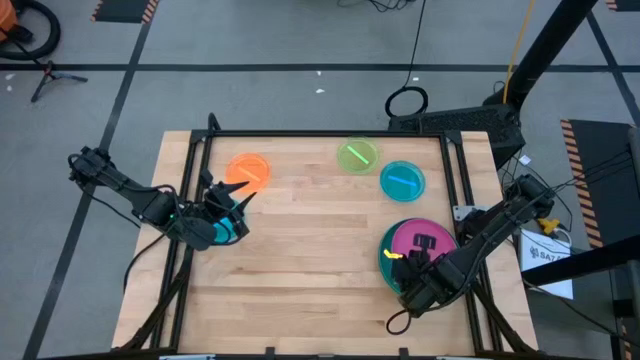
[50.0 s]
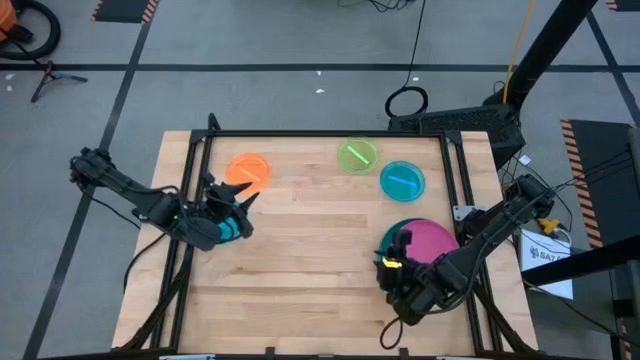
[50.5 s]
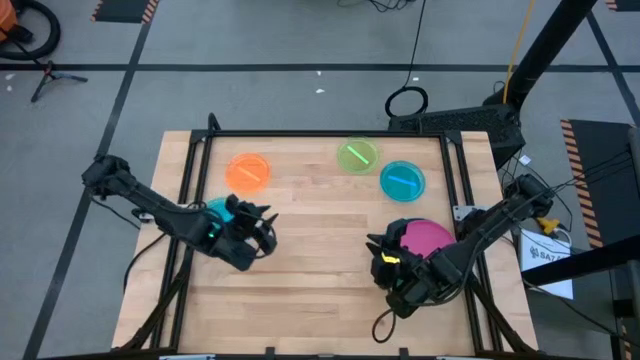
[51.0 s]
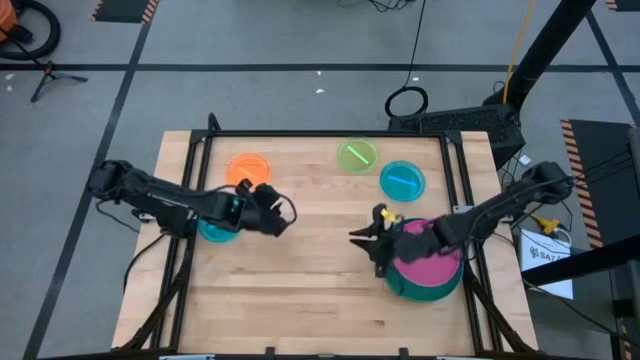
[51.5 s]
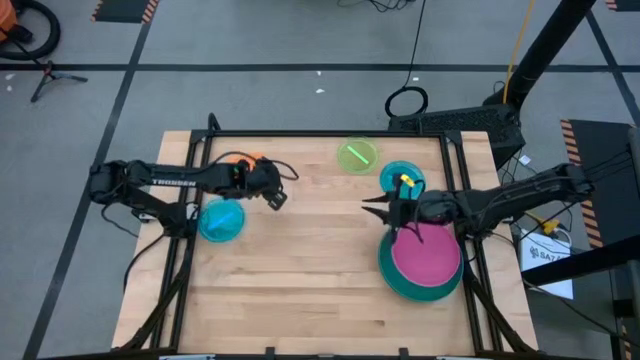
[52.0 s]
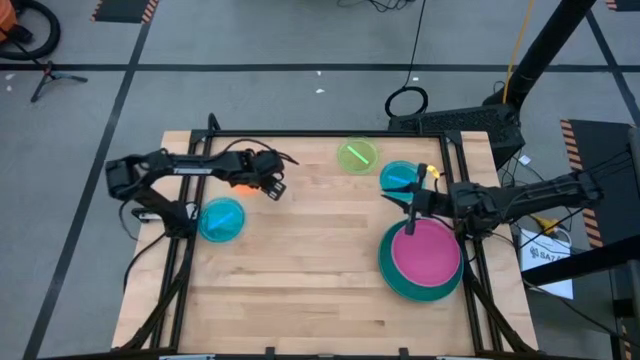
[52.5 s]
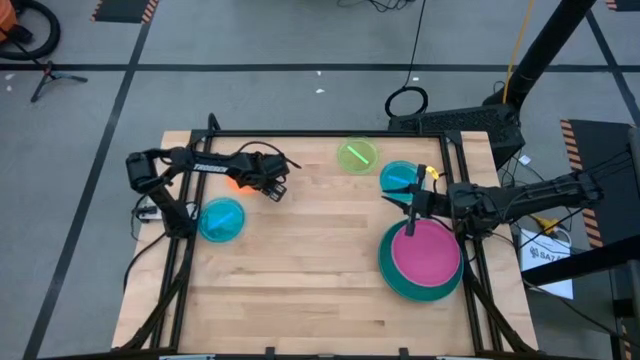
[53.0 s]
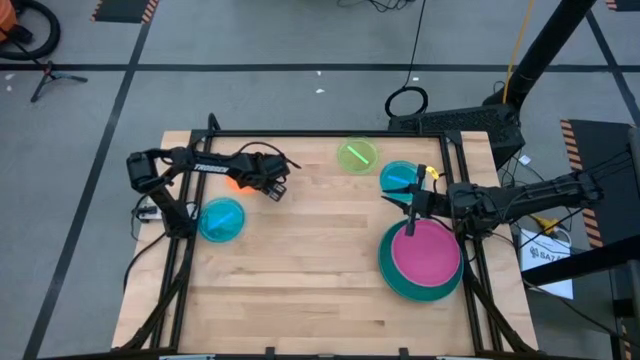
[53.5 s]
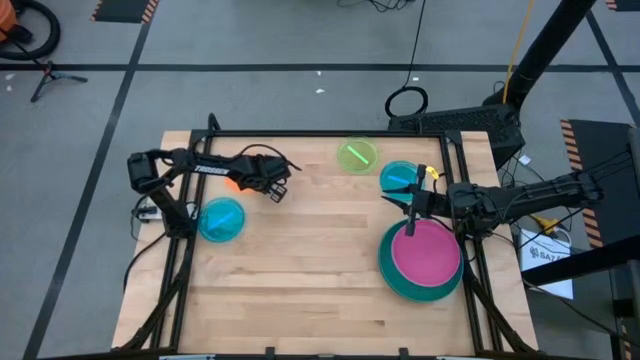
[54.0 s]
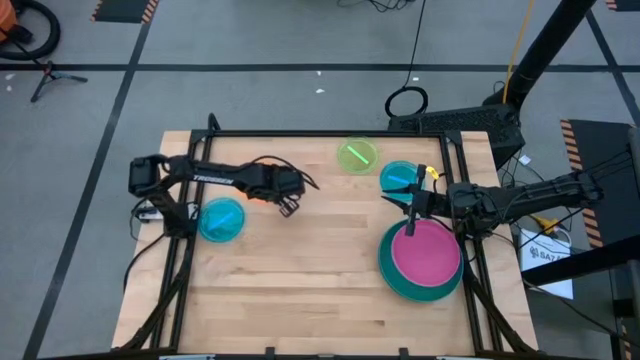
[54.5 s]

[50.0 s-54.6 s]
Task: Stack plastic plates
Stack the orange plate on top of the pink plate

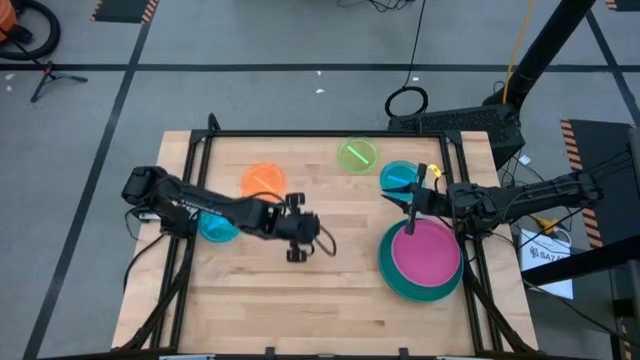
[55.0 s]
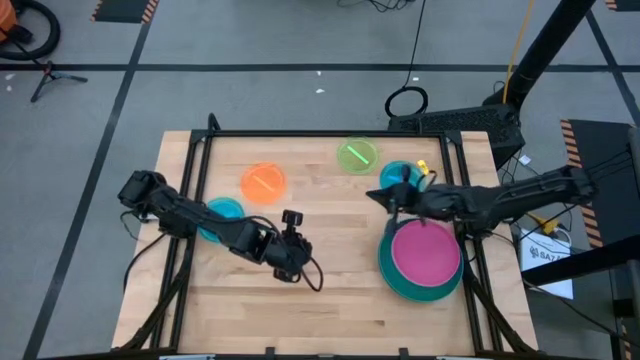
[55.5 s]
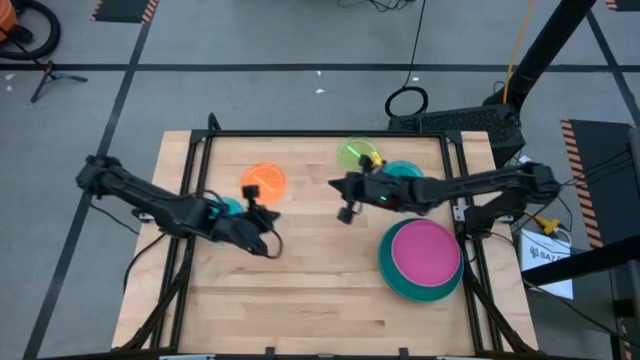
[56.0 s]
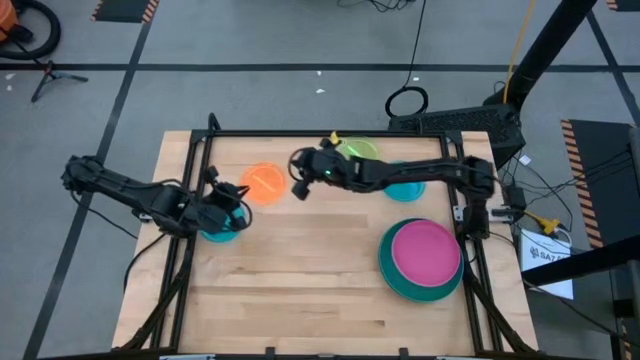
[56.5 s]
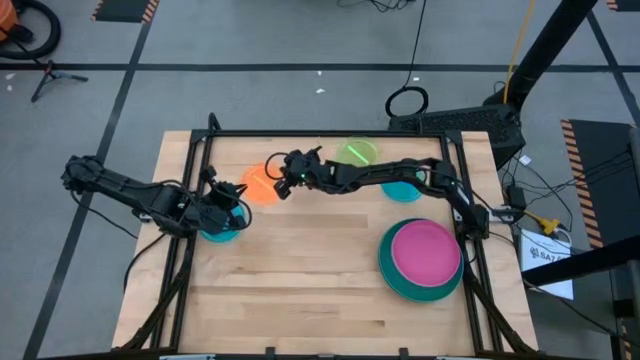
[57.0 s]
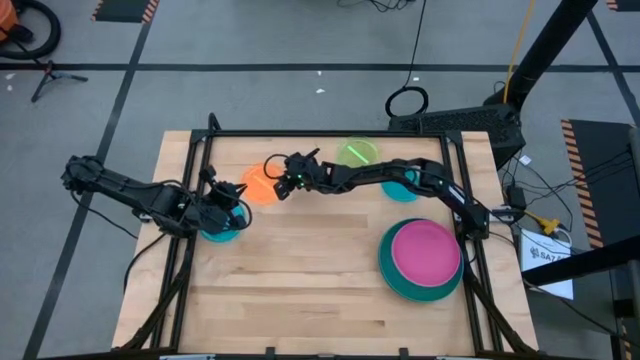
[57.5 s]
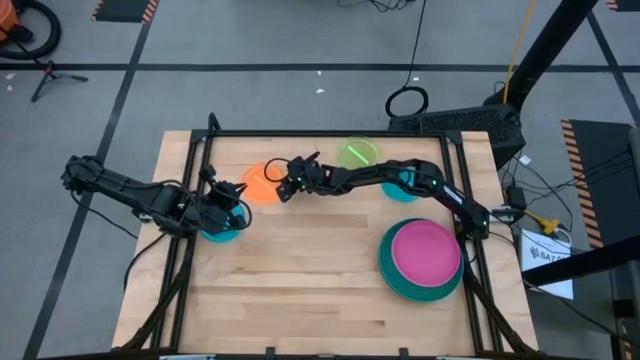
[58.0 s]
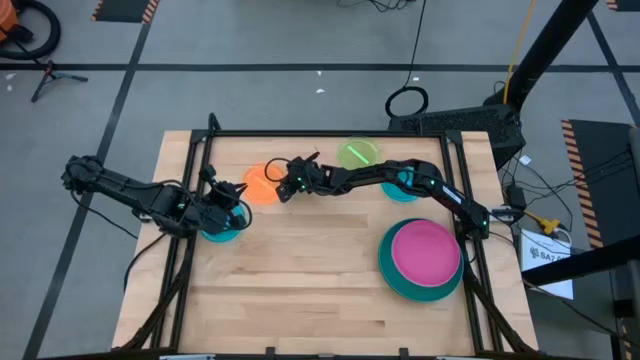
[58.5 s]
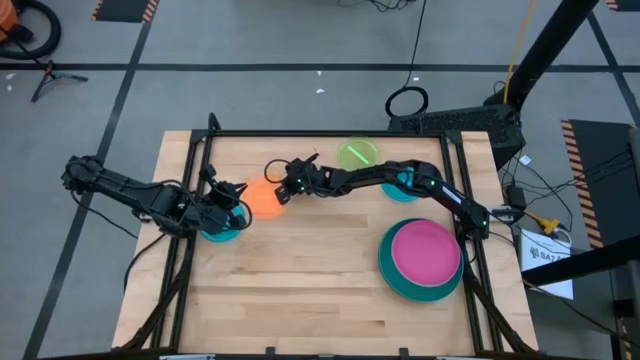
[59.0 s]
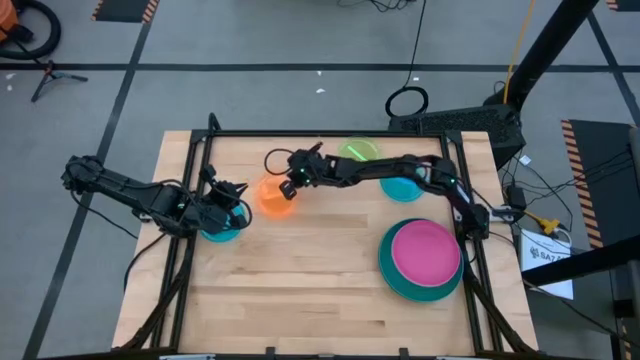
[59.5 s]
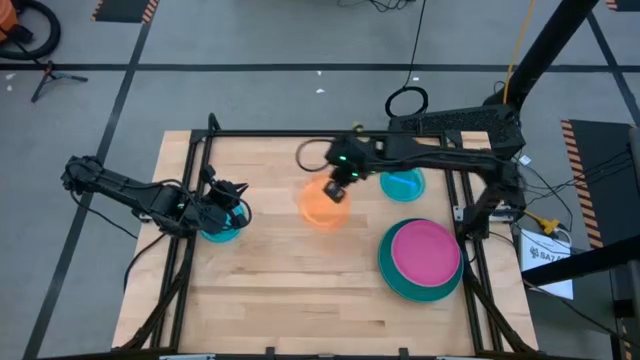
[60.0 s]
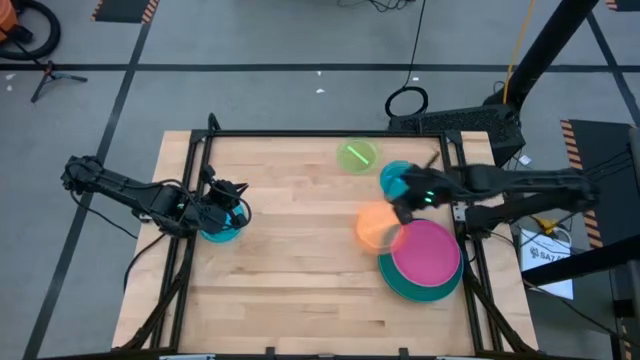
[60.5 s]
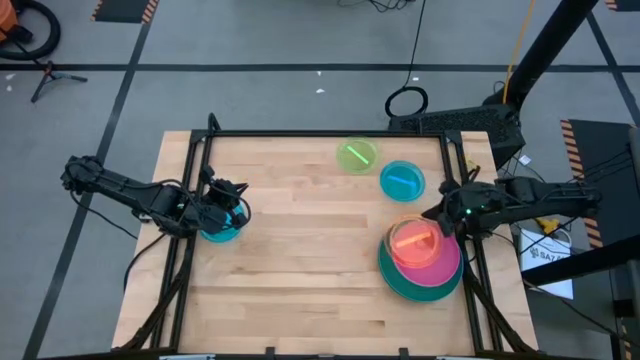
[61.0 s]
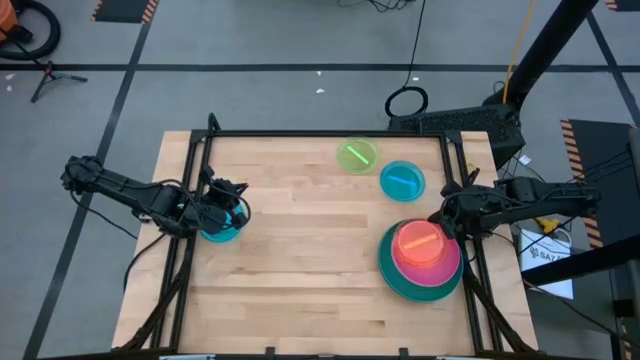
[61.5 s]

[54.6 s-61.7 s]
Stack the orange plate on top of the pink plate

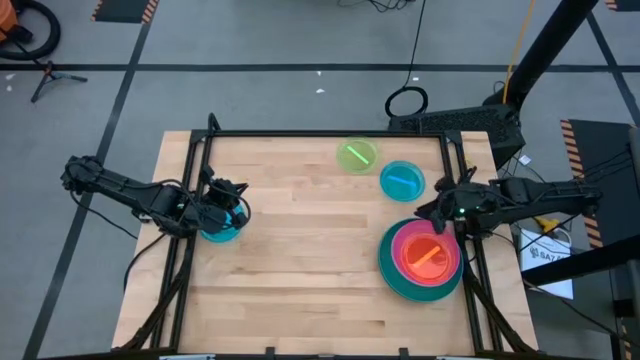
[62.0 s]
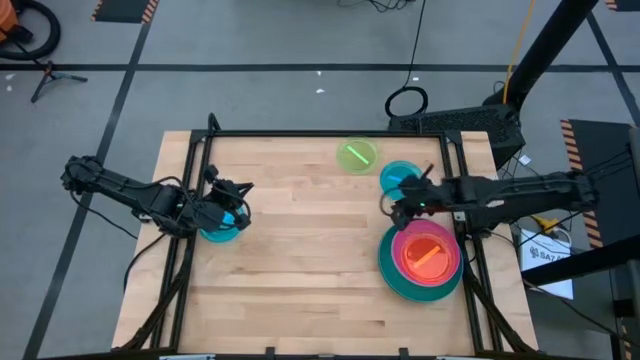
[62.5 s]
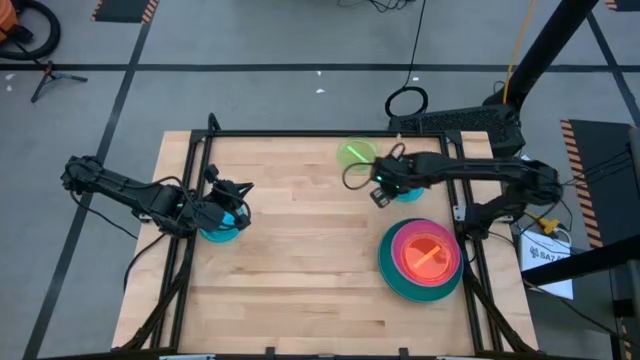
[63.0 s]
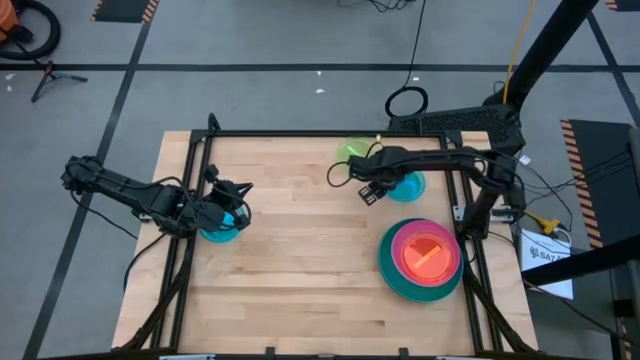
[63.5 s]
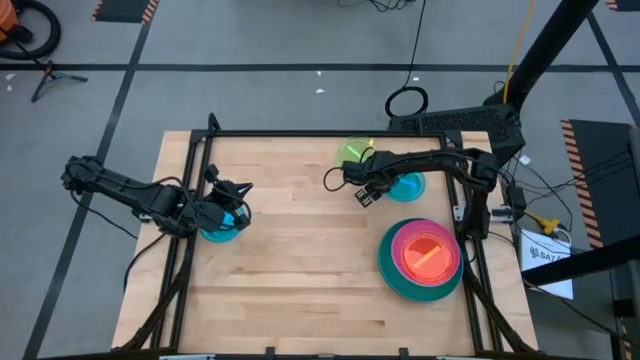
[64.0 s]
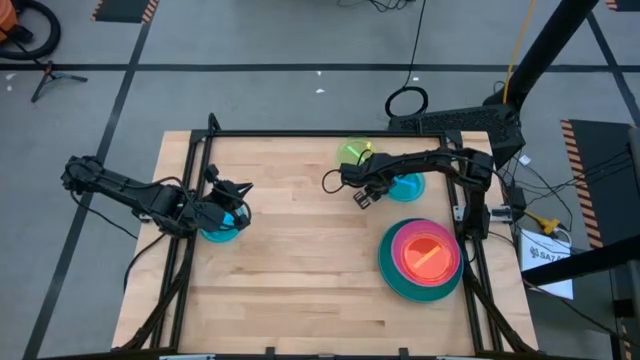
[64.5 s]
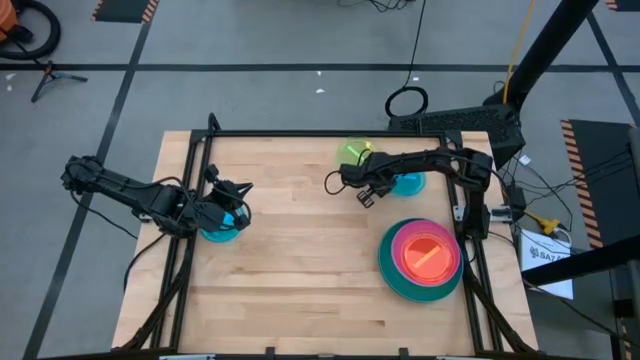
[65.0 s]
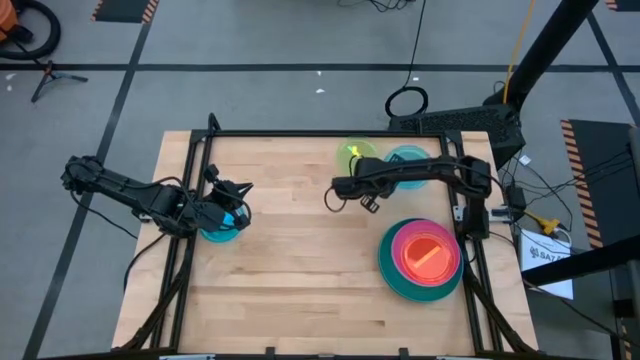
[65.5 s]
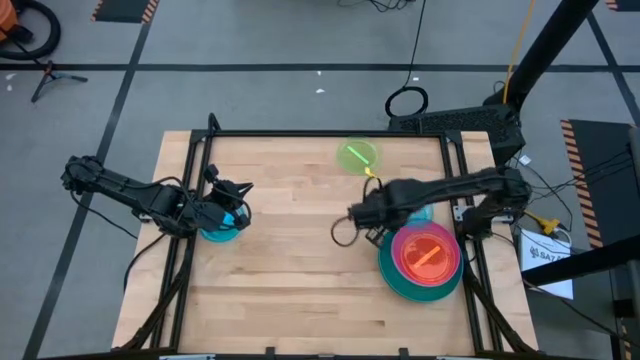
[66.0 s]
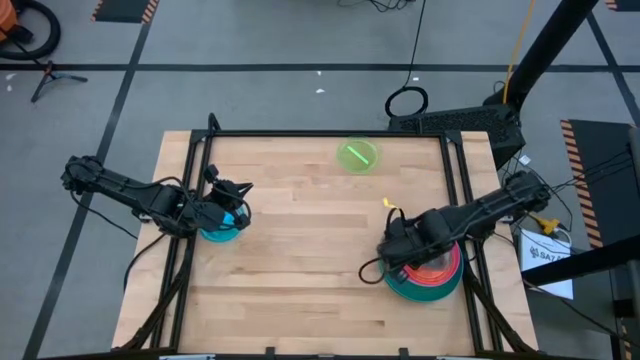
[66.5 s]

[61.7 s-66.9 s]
Stack the right light blue plate on top of the orange plate

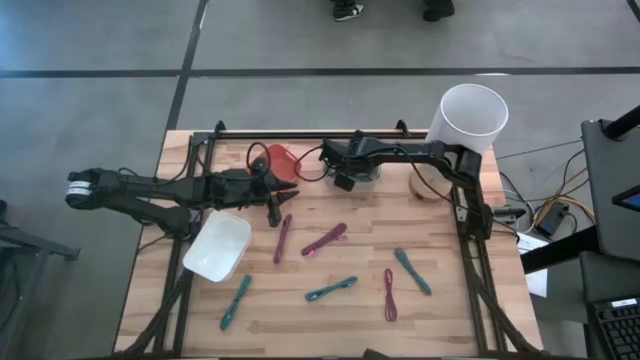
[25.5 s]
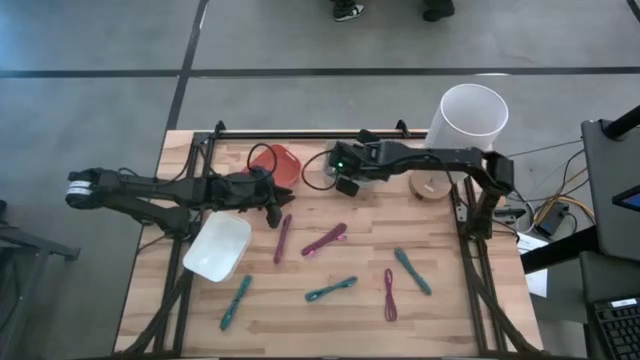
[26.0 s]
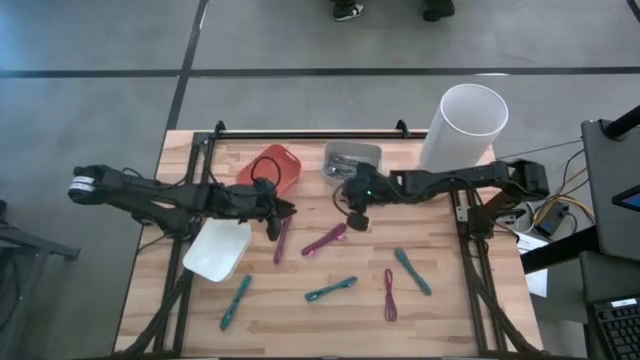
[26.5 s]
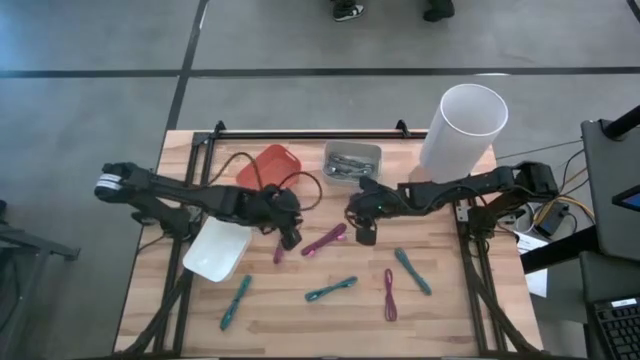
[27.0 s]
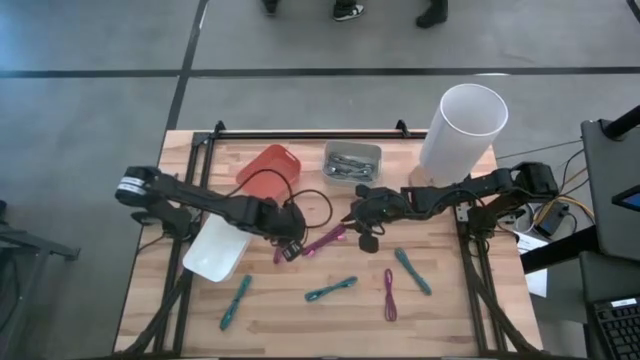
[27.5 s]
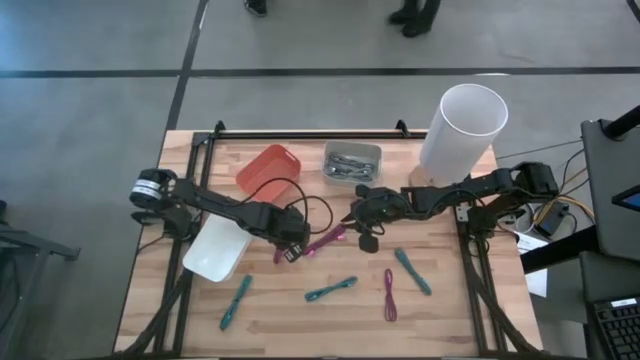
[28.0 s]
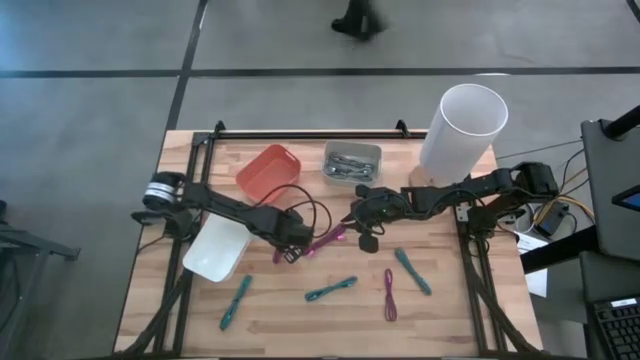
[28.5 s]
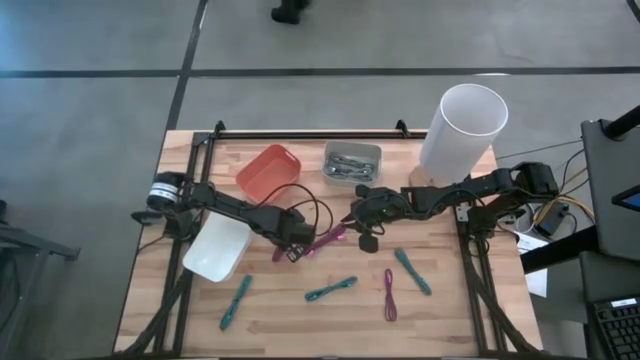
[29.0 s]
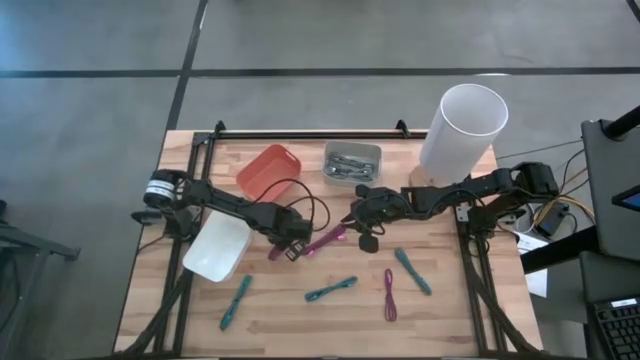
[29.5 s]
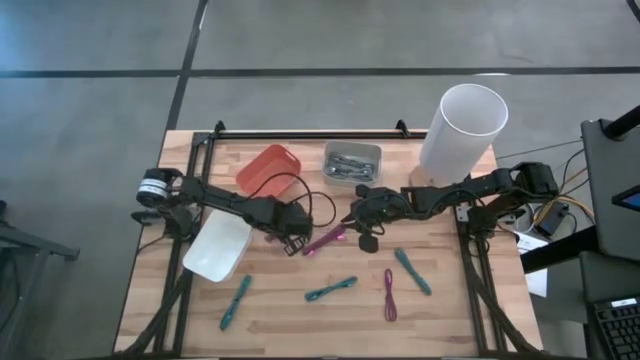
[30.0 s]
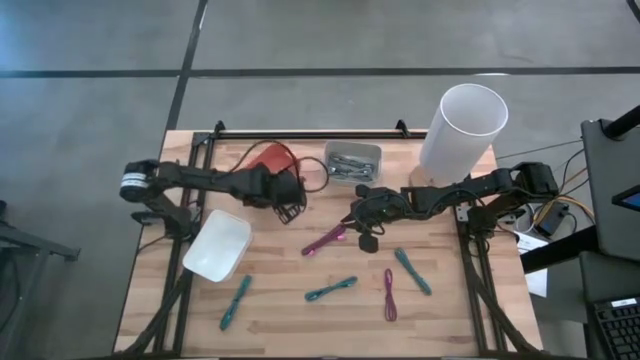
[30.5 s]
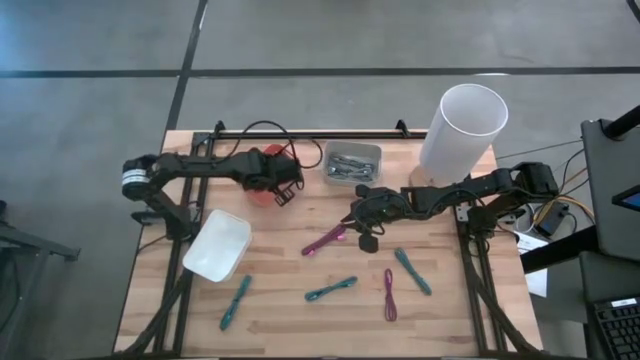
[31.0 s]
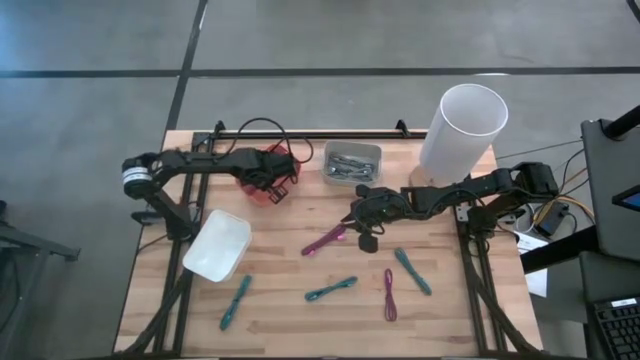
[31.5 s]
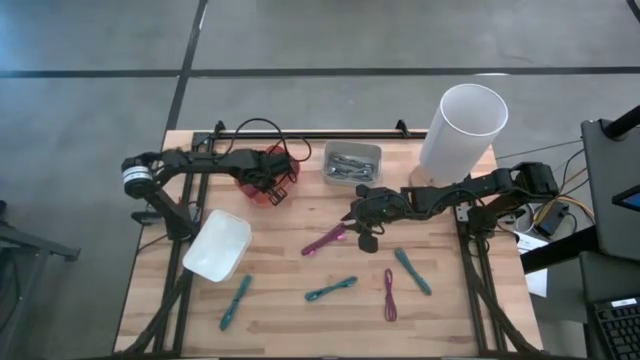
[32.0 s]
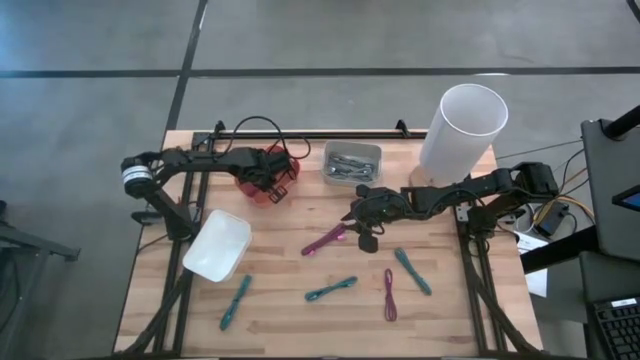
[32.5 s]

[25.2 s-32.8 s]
Task: Pick & Place USB Port
Put the top left pink USB cable into the orange bin
